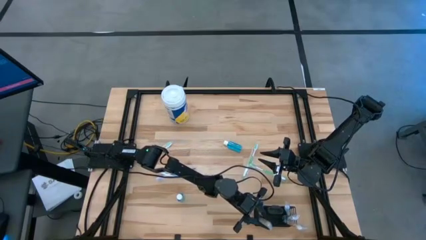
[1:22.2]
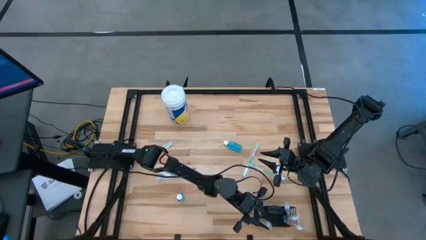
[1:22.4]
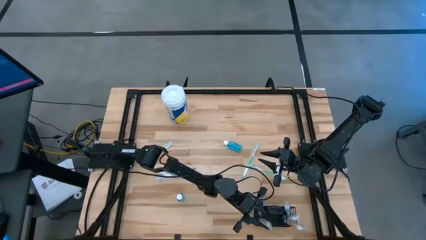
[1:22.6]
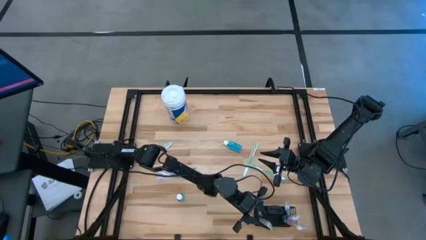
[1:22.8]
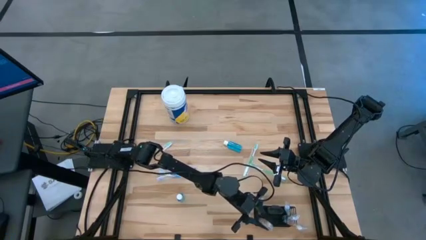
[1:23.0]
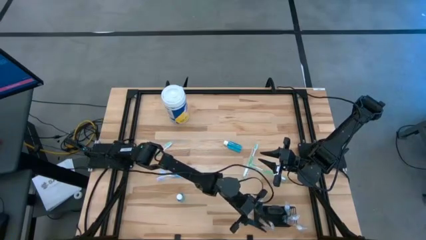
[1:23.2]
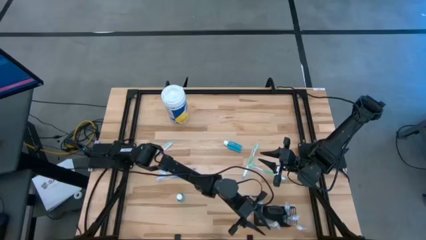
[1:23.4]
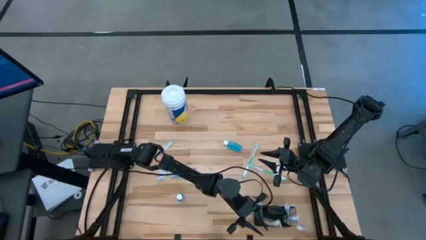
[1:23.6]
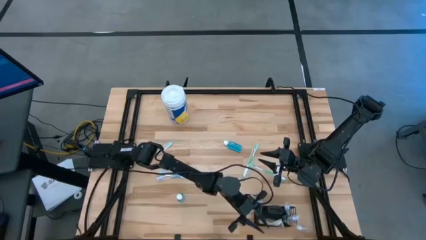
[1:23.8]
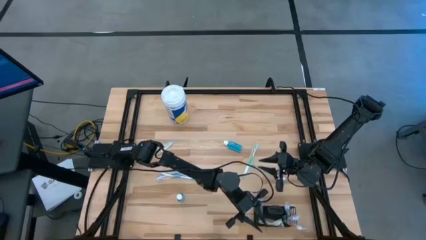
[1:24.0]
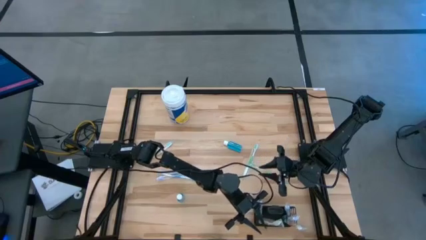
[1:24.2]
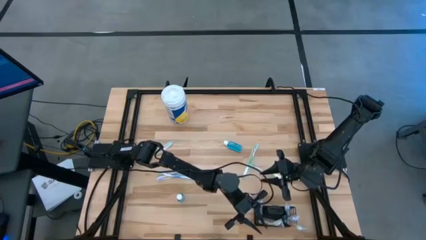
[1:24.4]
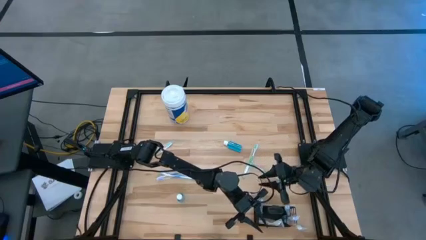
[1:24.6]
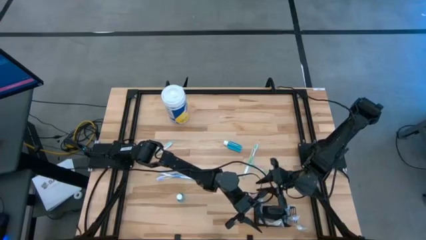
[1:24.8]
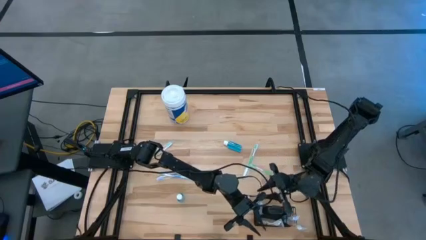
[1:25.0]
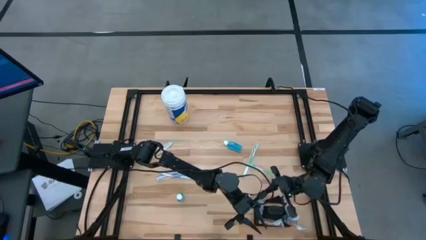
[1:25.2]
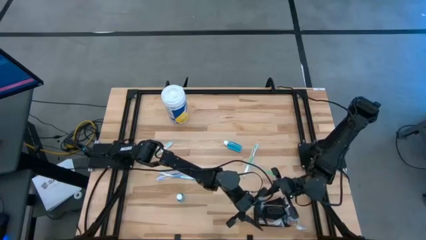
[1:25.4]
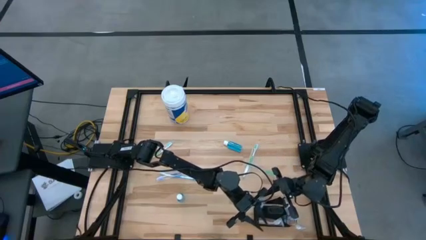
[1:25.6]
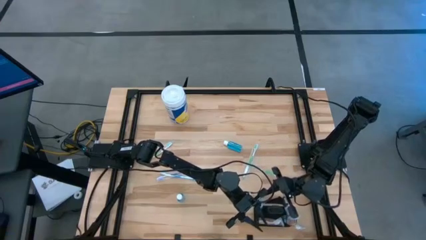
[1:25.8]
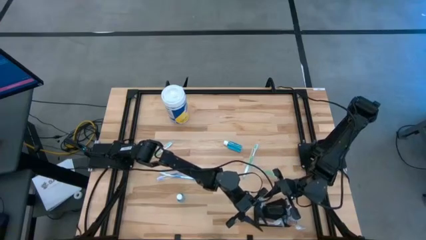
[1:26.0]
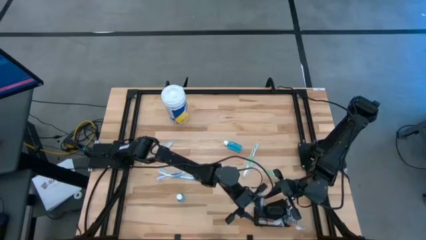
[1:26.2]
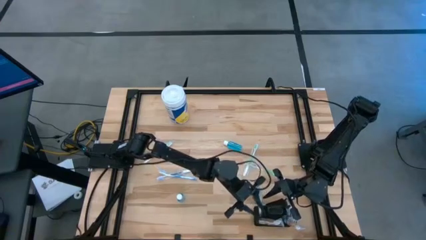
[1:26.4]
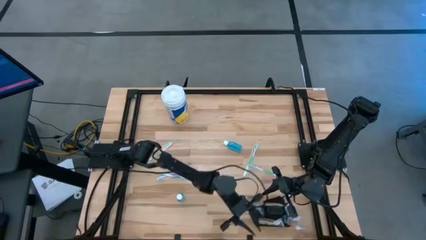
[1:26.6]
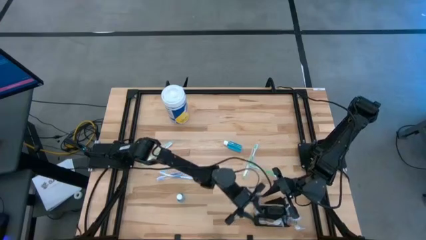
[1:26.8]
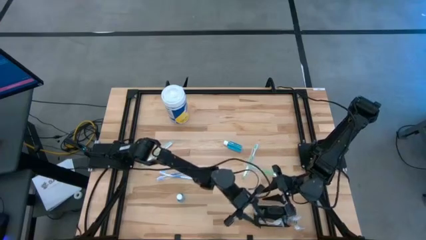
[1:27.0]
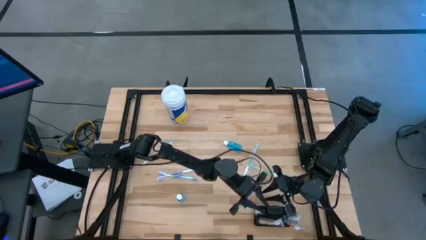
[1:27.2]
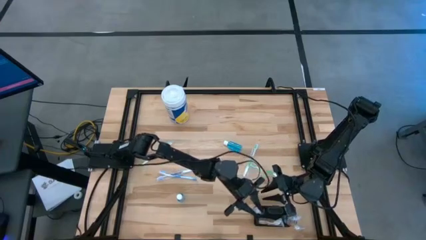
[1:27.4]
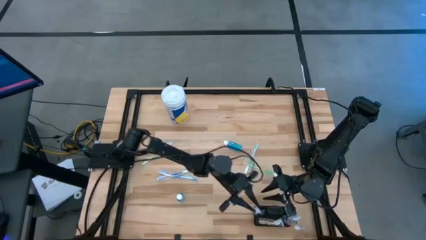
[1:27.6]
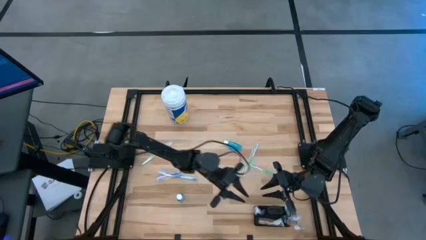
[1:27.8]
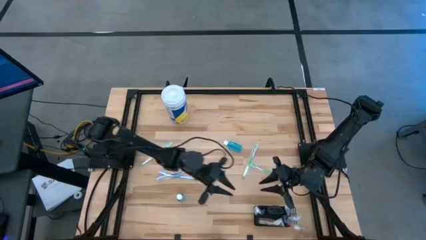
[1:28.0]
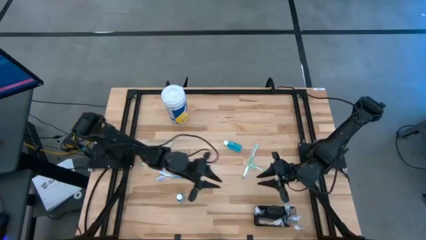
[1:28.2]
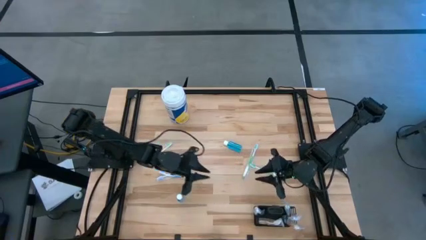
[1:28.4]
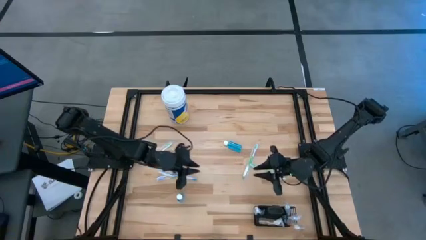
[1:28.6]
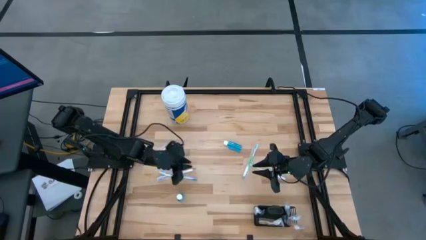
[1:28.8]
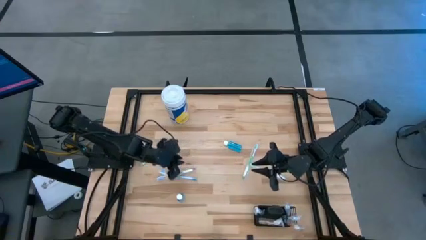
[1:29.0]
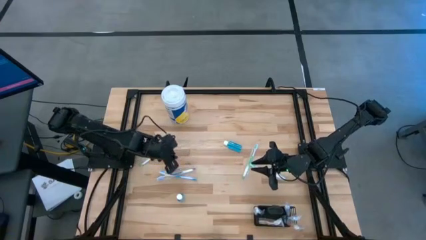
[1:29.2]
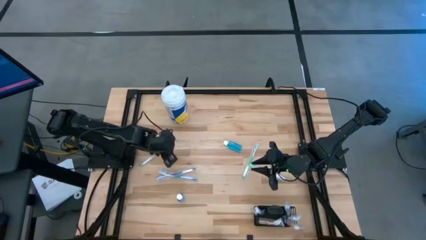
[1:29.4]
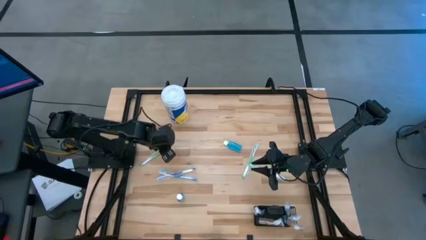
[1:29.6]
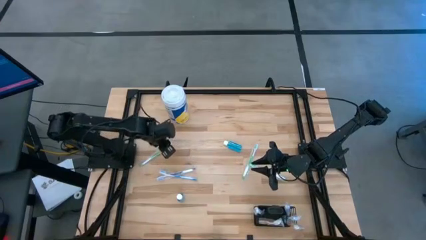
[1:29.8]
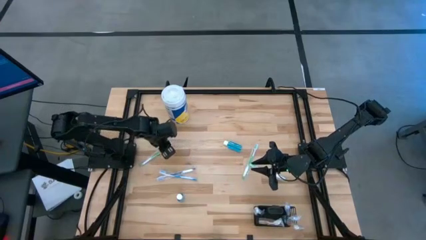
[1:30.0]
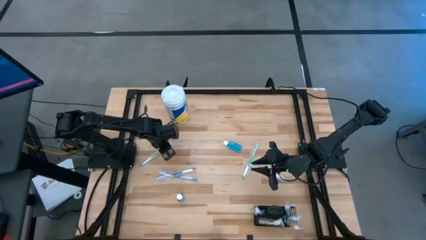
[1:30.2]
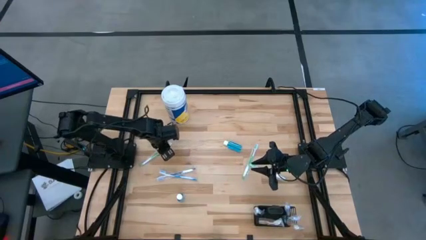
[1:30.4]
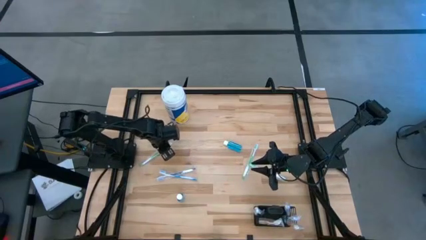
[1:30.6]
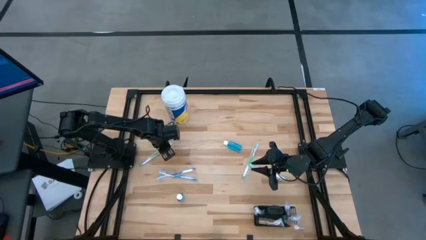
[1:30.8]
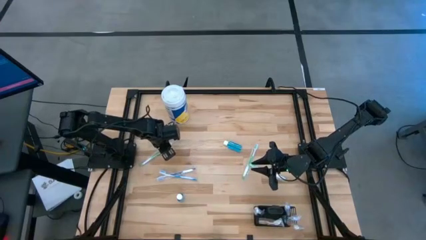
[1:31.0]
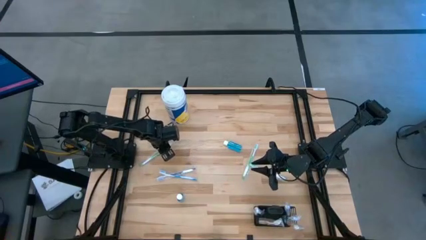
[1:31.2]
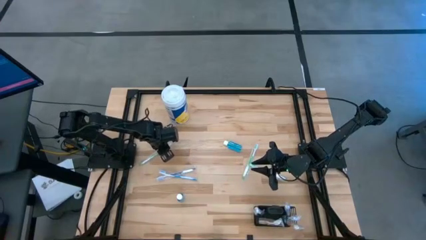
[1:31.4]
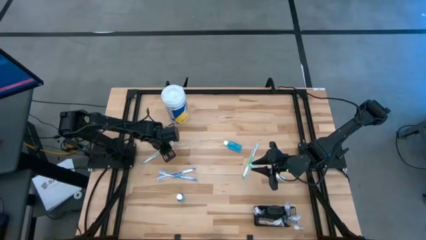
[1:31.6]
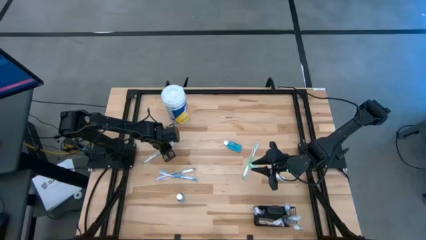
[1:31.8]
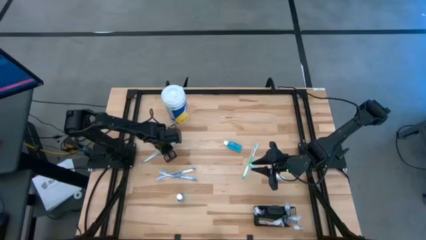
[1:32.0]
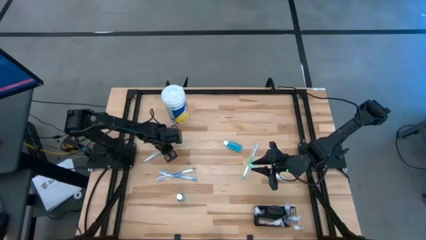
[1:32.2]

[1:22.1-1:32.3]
Task: Pick & Place toothbrushing station
Put the left green toothbrush into the wire organizer

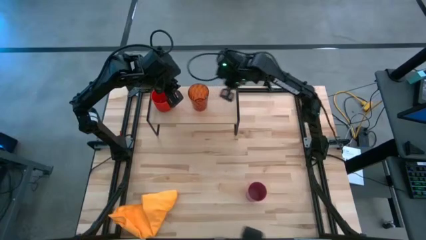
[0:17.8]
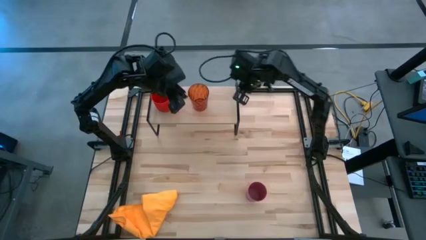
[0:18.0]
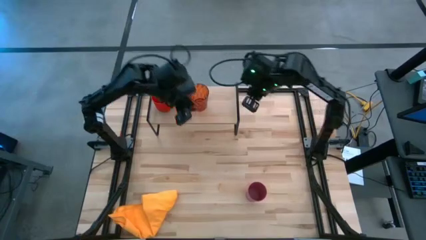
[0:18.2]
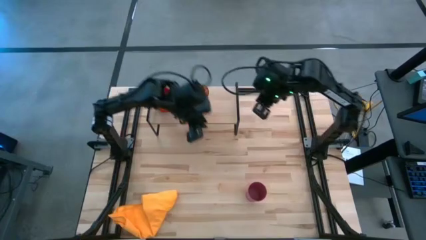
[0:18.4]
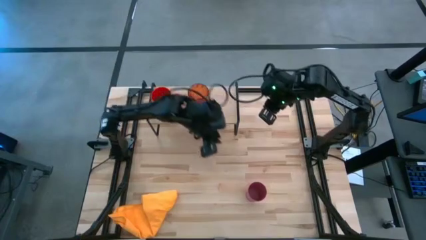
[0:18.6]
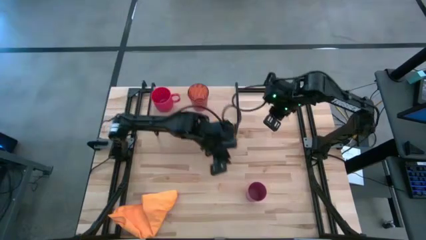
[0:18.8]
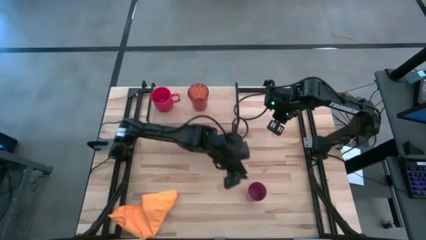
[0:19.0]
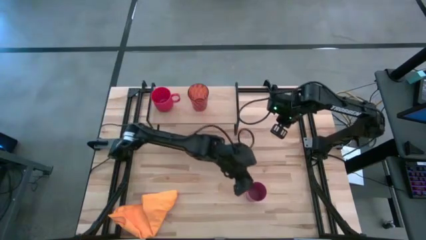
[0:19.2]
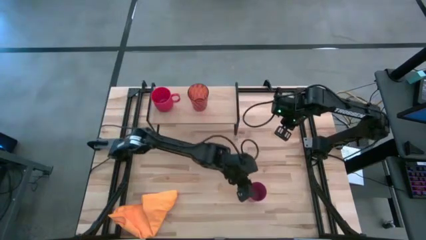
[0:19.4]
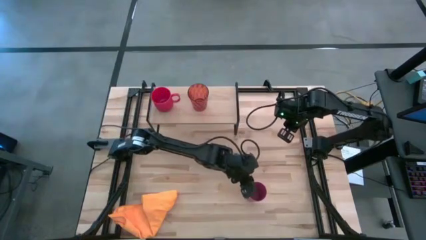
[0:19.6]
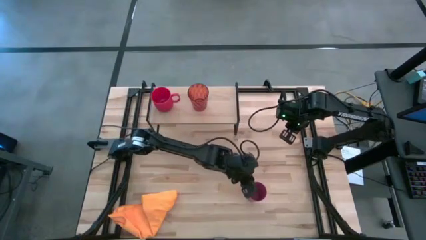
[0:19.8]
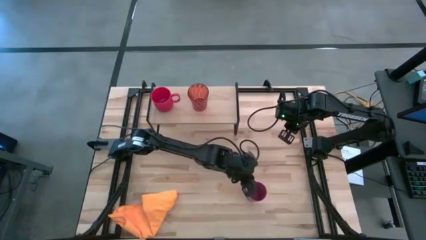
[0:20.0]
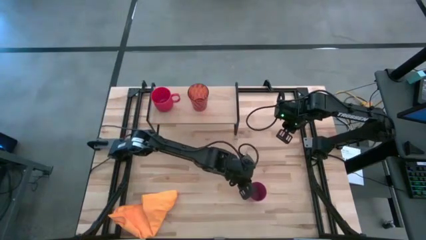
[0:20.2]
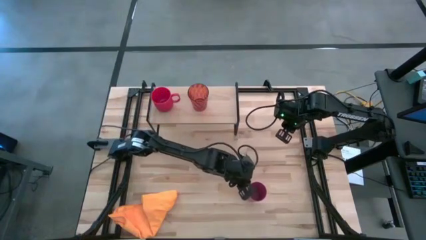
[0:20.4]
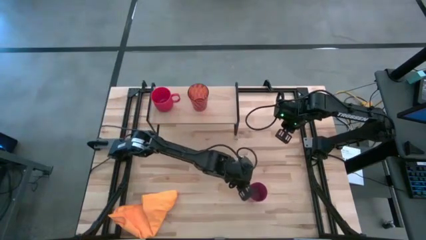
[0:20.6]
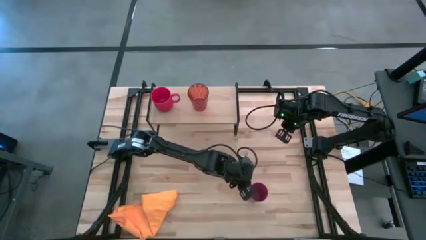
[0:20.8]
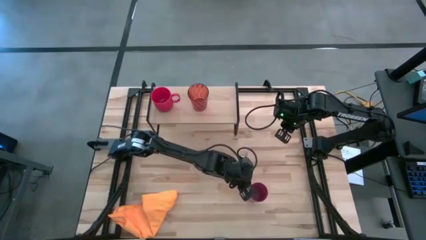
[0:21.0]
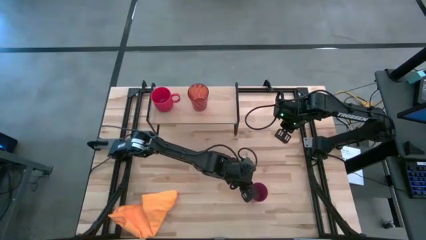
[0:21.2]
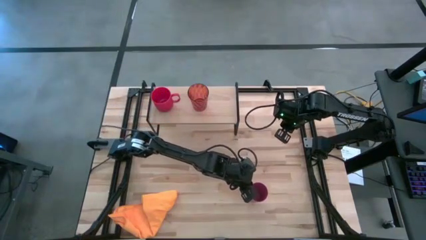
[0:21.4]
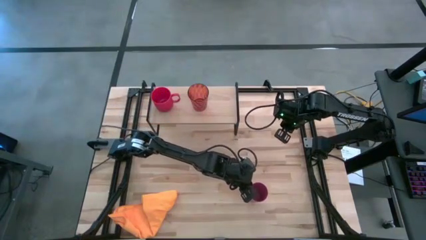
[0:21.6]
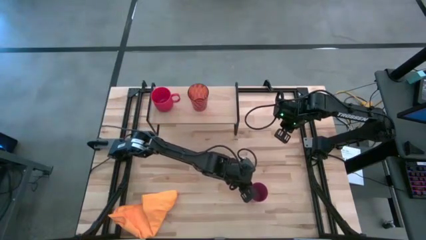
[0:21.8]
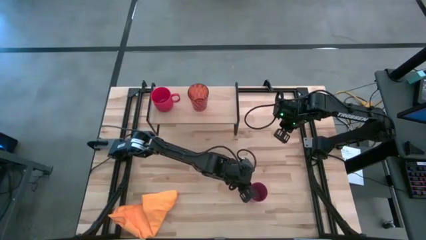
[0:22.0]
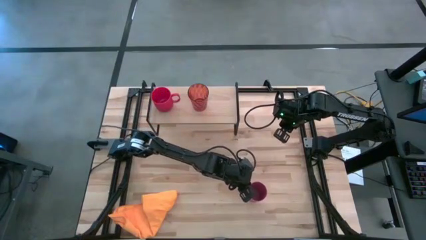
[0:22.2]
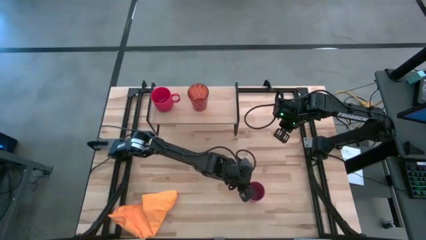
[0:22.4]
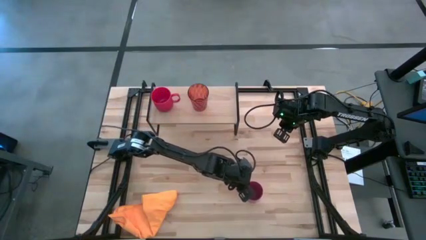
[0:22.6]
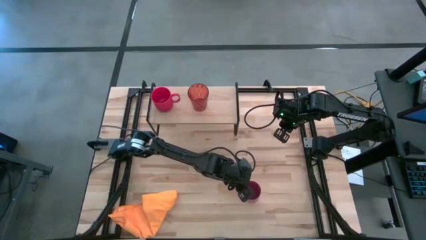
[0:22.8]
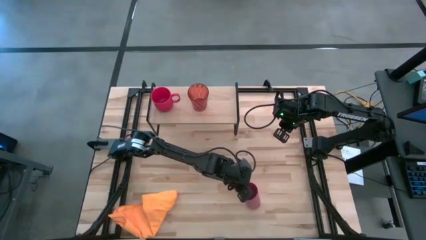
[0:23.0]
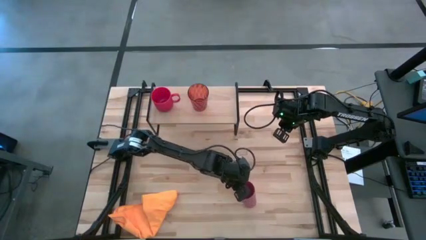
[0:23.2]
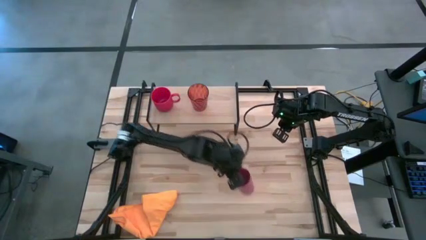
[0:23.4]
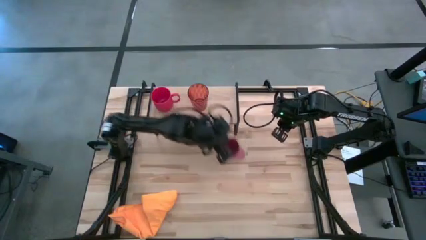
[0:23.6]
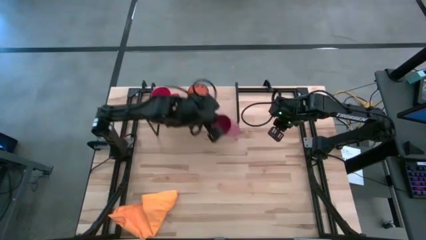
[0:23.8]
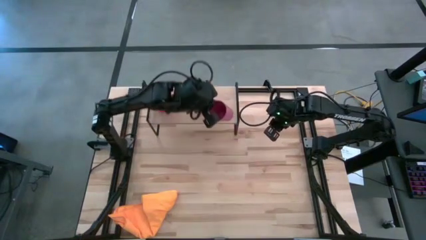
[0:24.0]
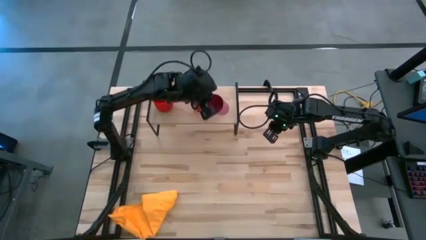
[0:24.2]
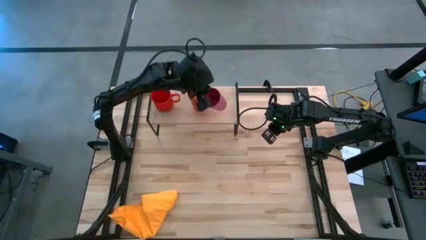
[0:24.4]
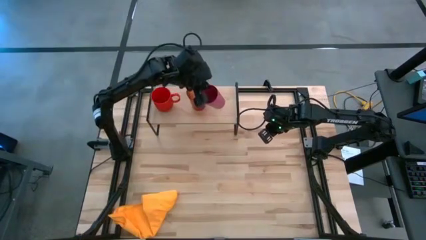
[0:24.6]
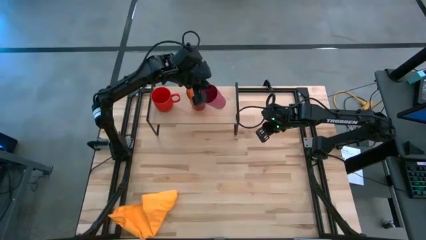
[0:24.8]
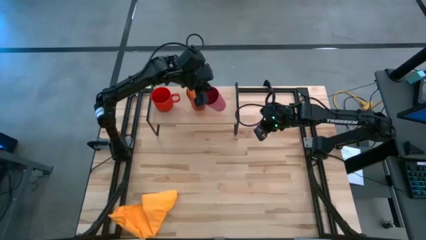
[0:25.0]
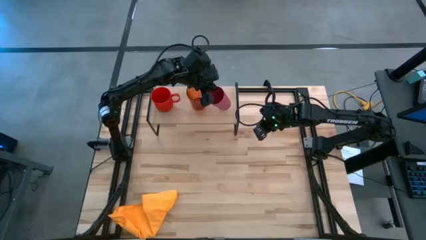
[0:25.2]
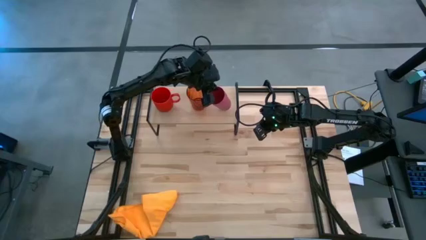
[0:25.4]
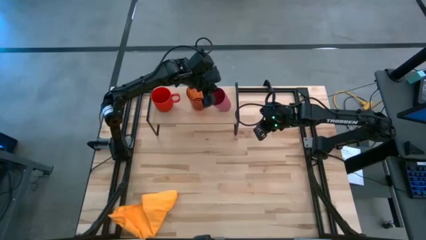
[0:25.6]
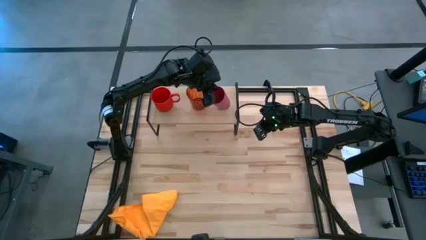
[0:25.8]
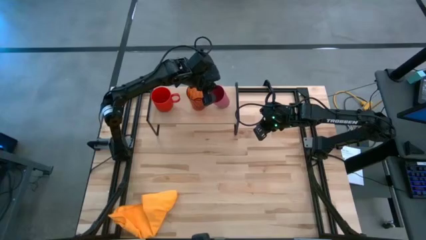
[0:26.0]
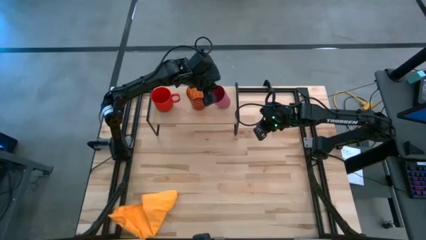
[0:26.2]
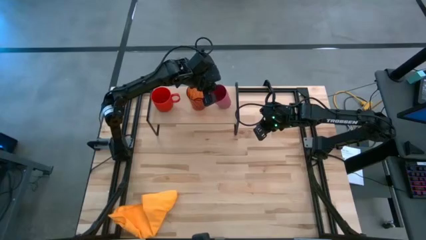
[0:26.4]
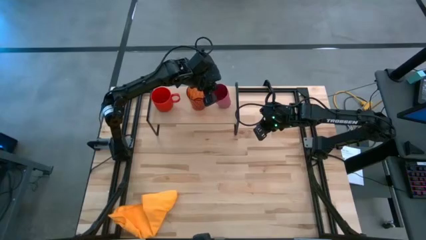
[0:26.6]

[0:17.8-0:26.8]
Task: Stack small to large cups/mugs on shelf
Put the pink cup on the shelf
